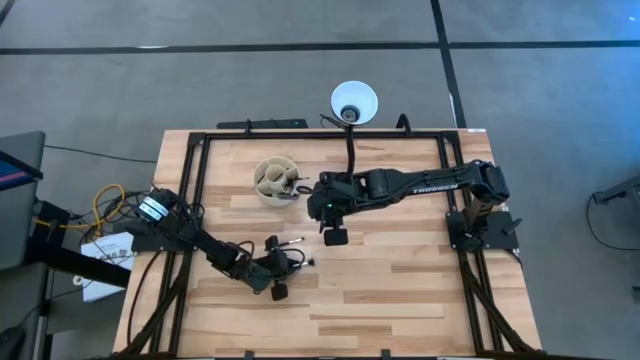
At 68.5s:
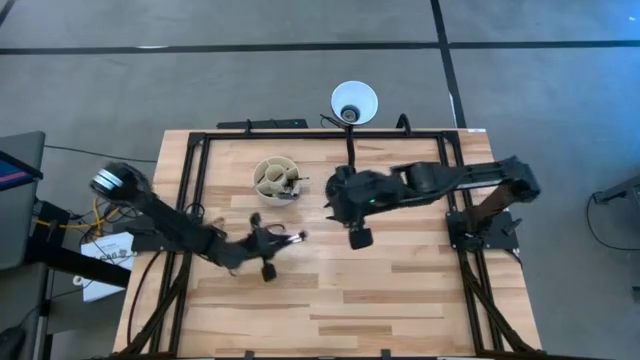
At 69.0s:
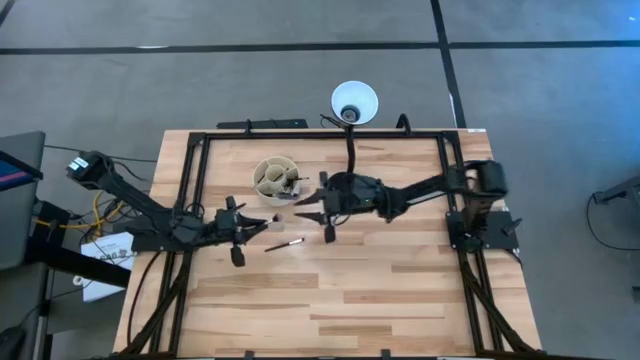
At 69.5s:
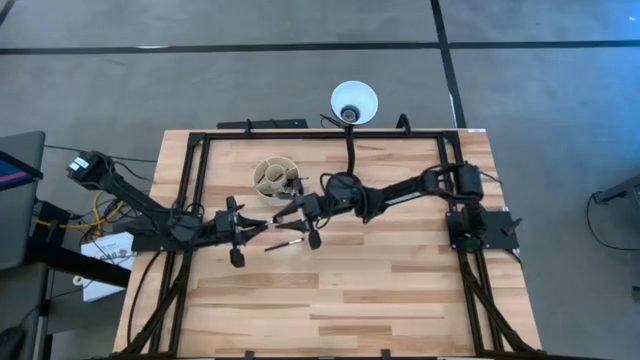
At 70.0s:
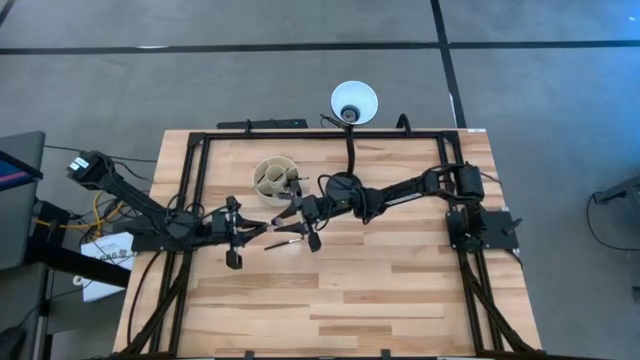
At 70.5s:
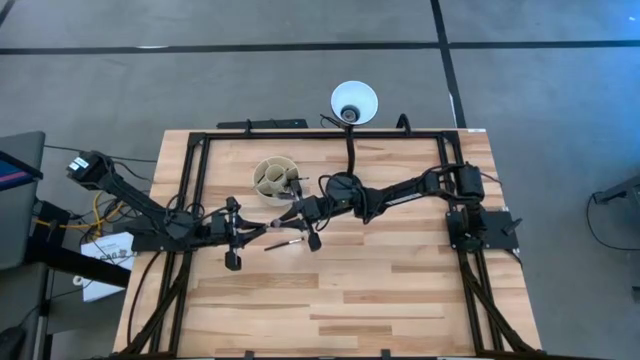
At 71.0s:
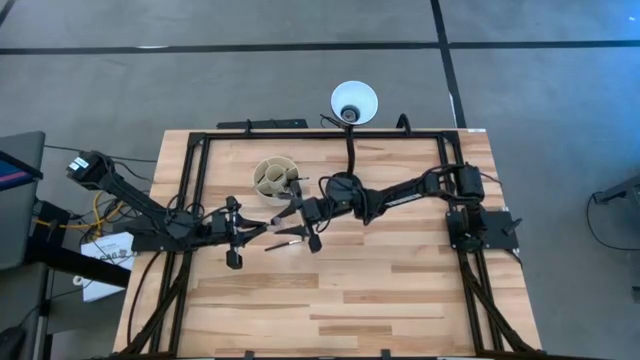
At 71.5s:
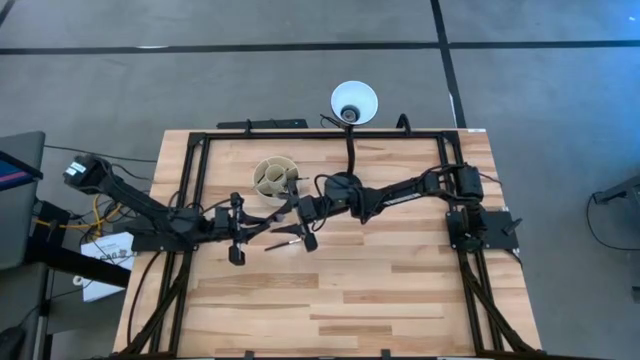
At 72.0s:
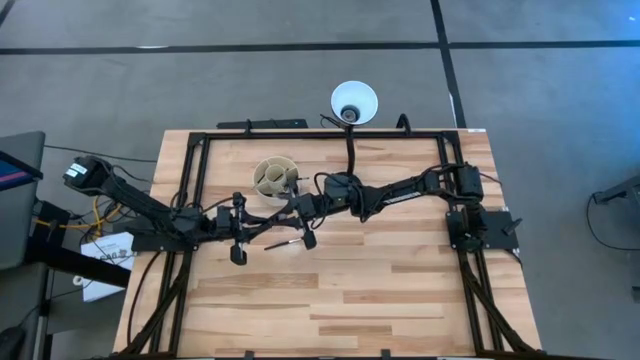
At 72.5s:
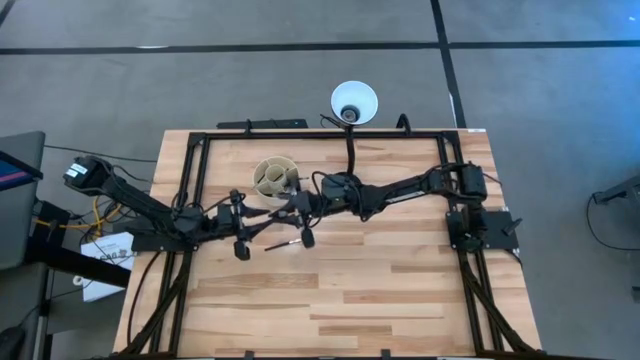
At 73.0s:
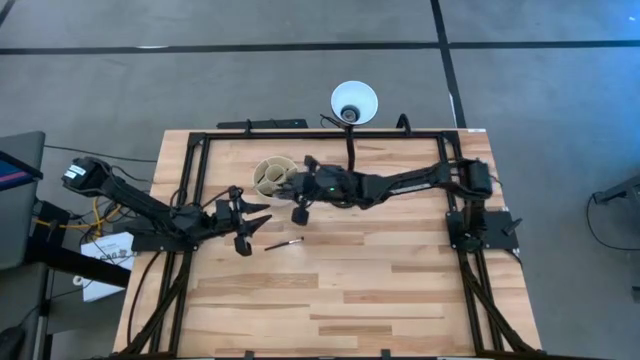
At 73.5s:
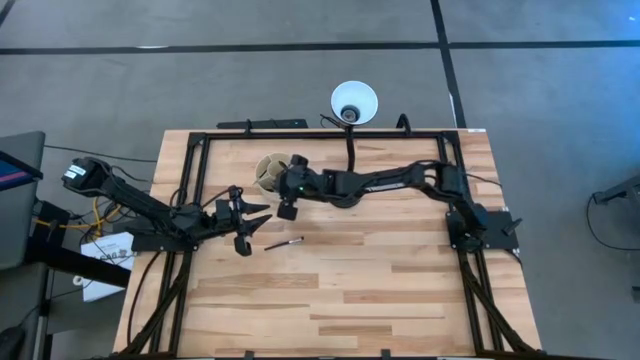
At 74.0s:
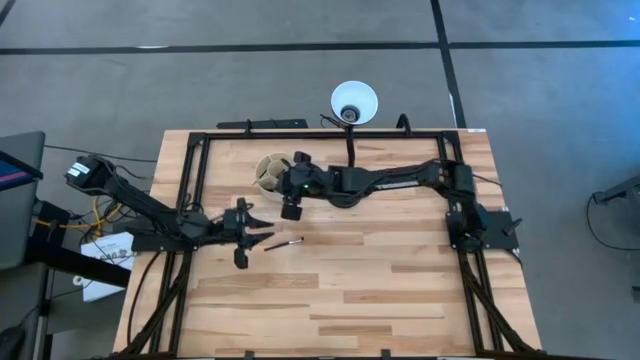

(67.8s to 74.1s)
Task: Put items in baskets/containers
Put the blush brush into the organizer

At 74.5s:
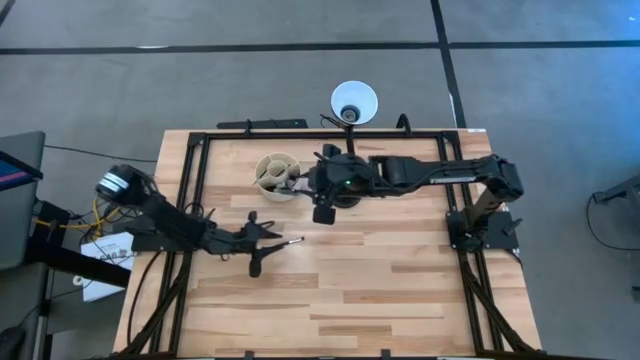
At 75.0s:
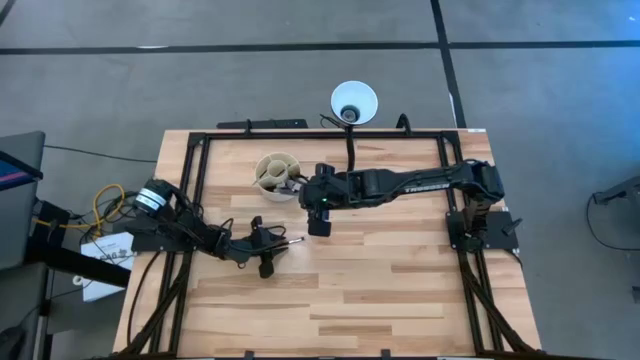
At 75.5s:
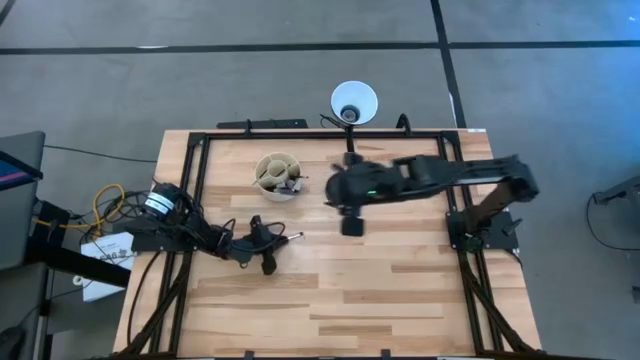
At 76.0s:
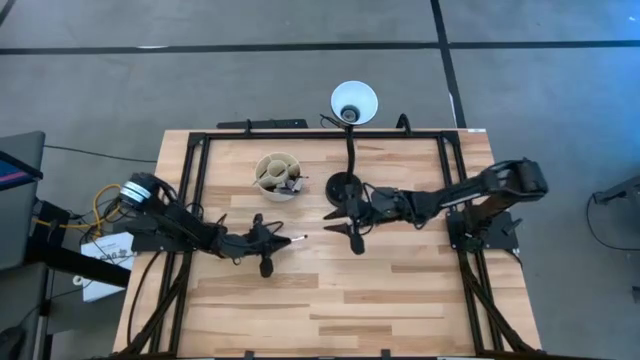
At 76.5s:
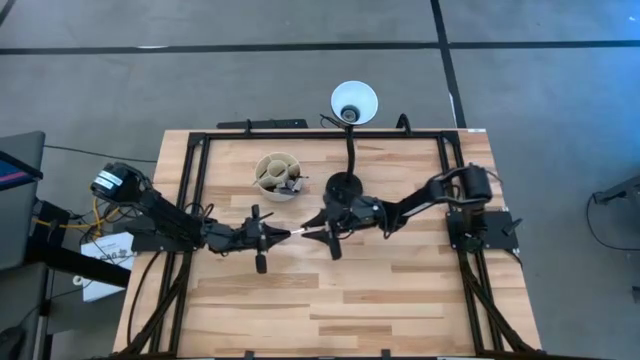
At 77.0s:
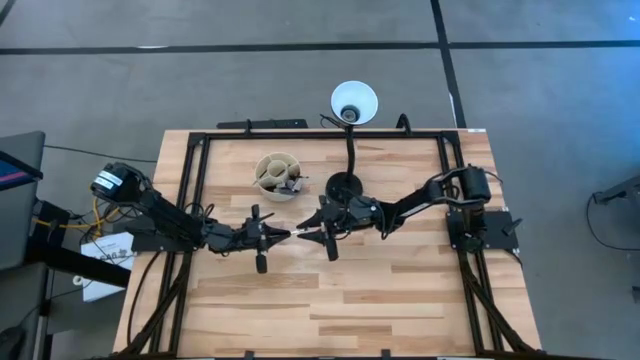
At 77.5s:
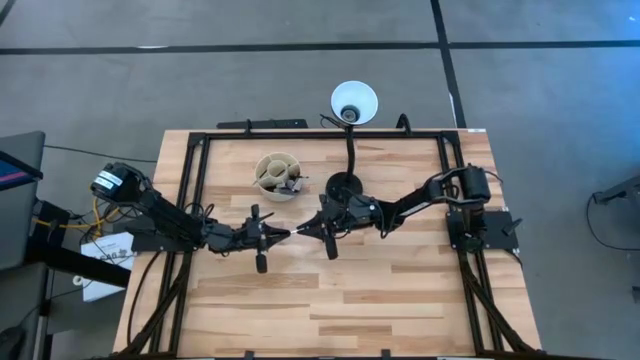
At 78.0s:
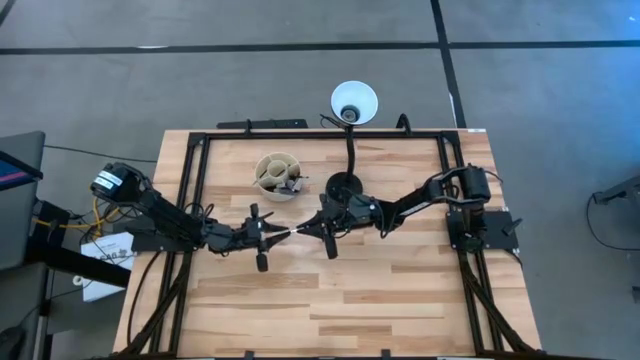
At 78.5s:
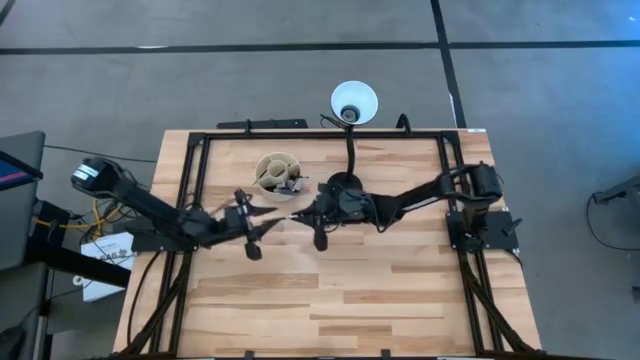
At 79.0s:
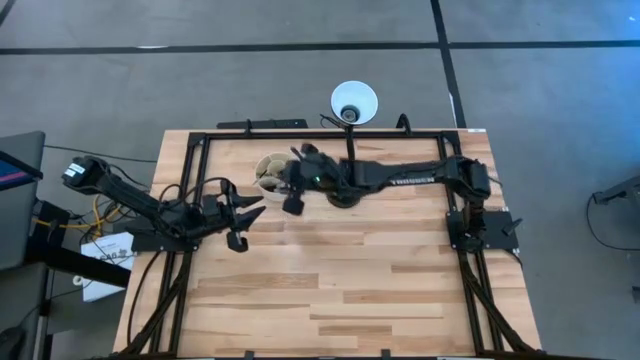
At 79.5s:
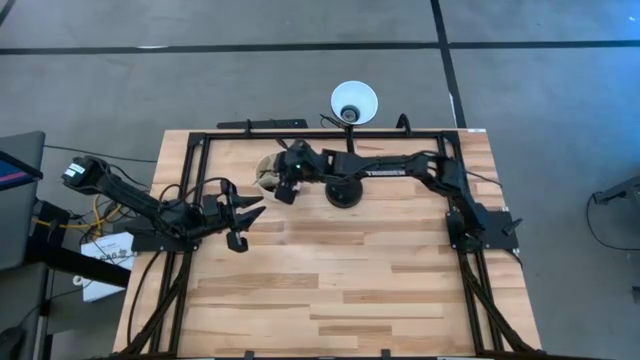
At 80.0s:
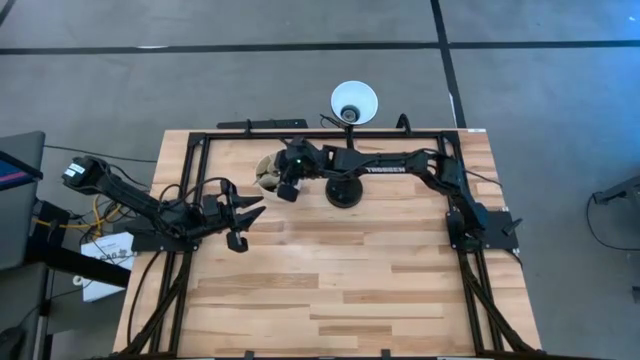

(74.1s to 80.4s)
Put the foundation brush into the organizer

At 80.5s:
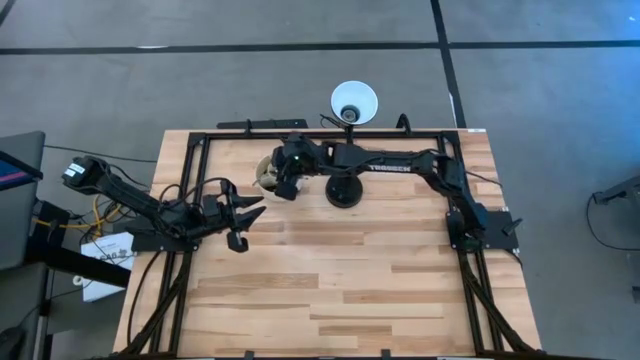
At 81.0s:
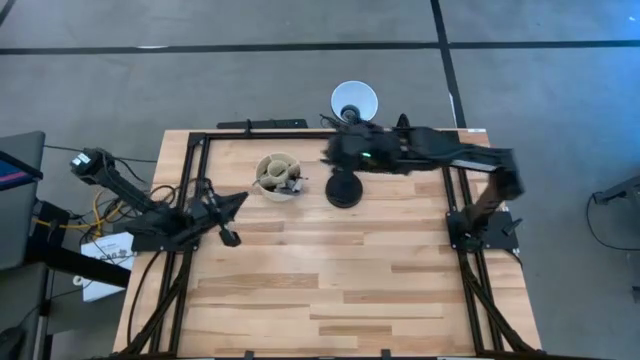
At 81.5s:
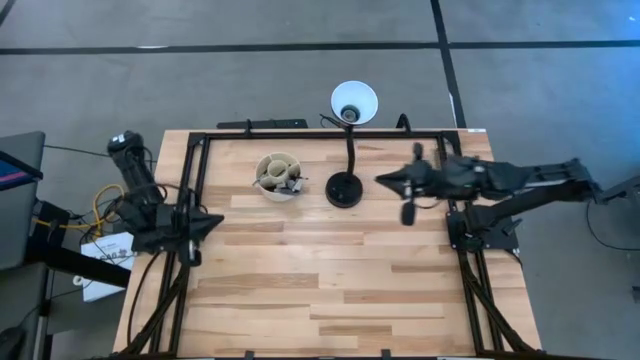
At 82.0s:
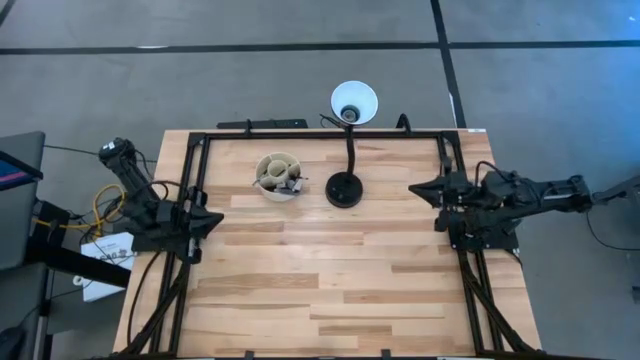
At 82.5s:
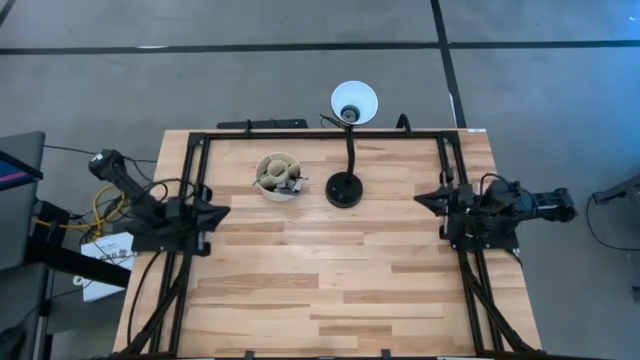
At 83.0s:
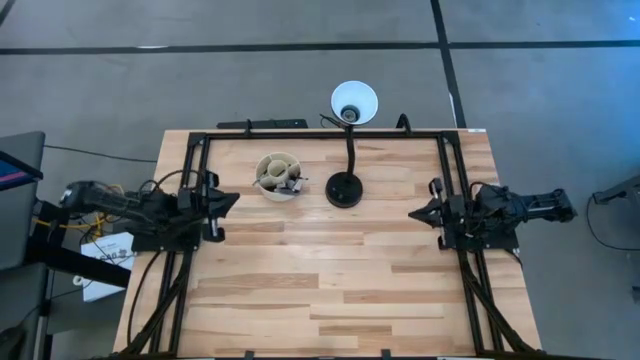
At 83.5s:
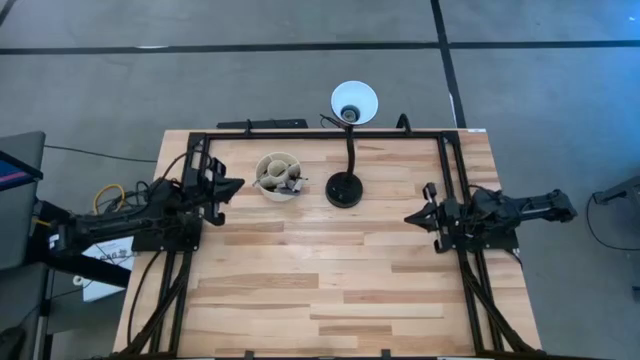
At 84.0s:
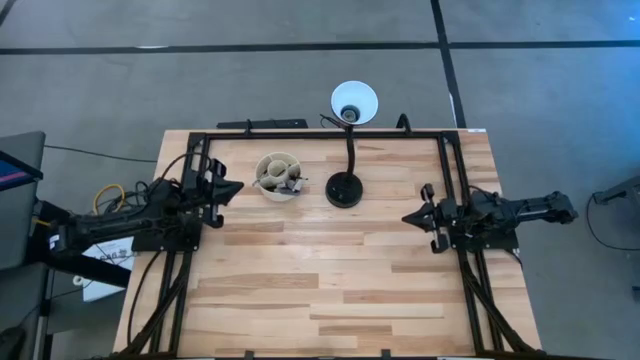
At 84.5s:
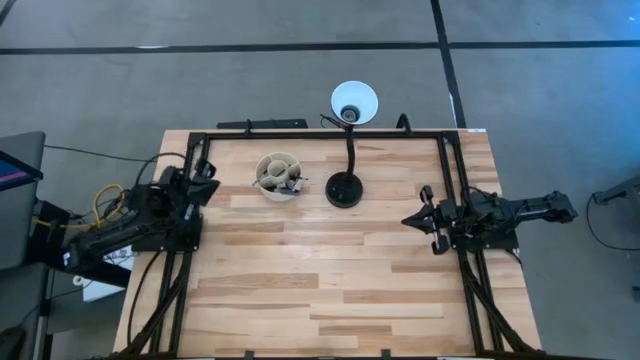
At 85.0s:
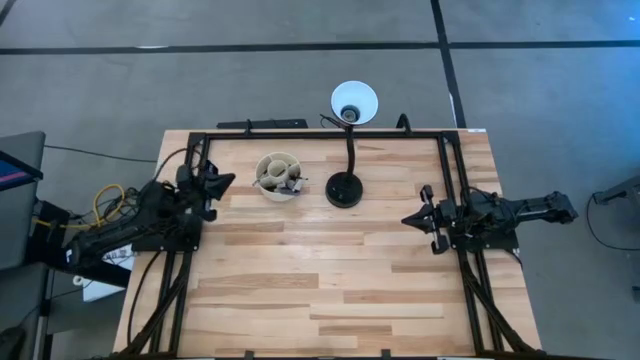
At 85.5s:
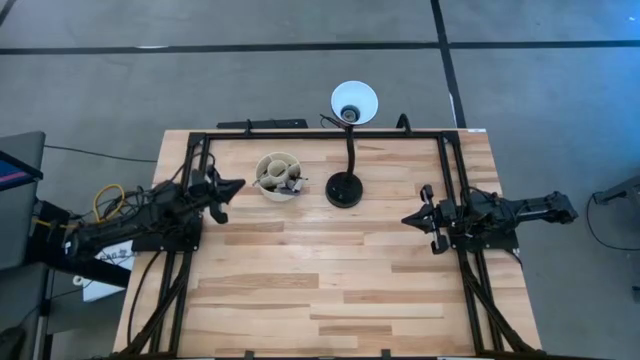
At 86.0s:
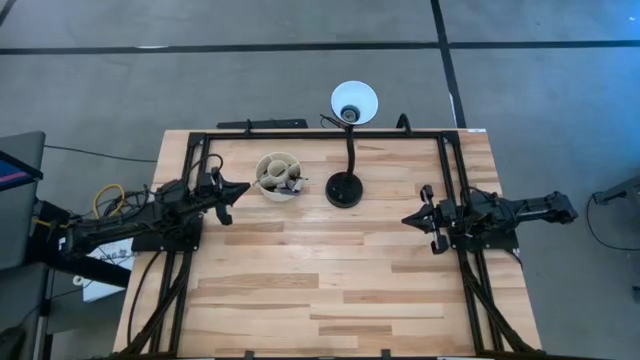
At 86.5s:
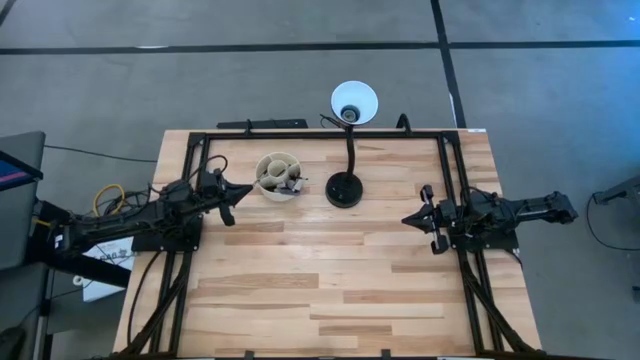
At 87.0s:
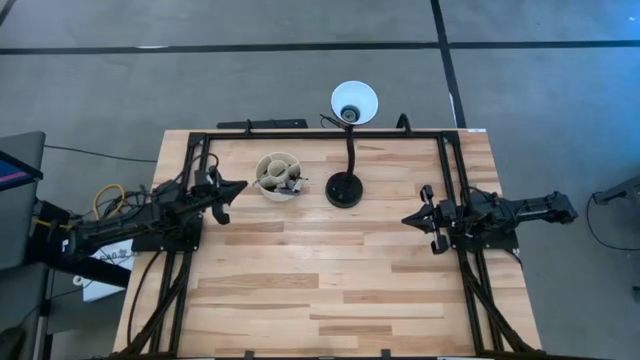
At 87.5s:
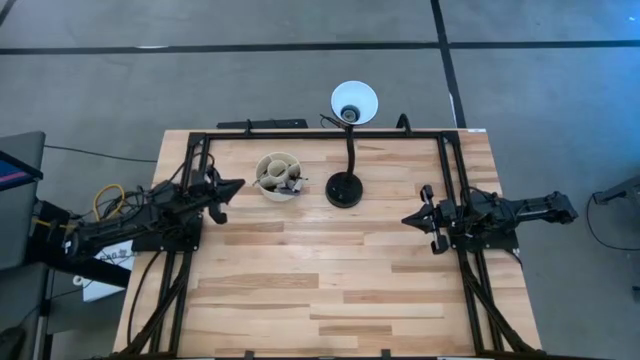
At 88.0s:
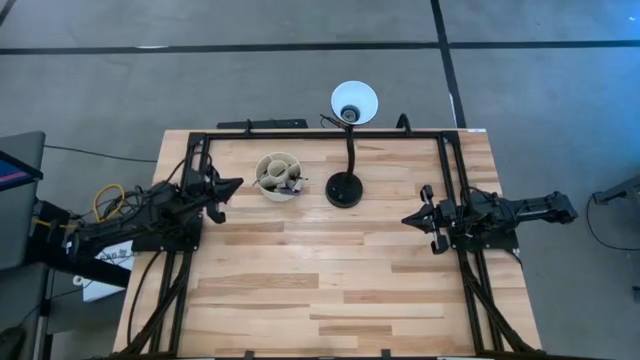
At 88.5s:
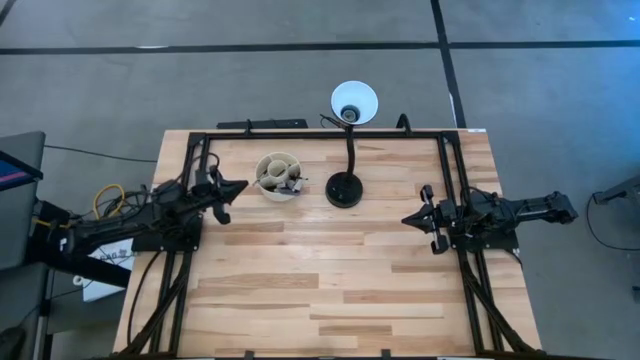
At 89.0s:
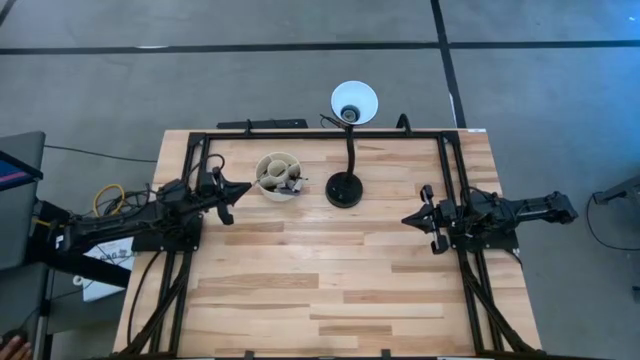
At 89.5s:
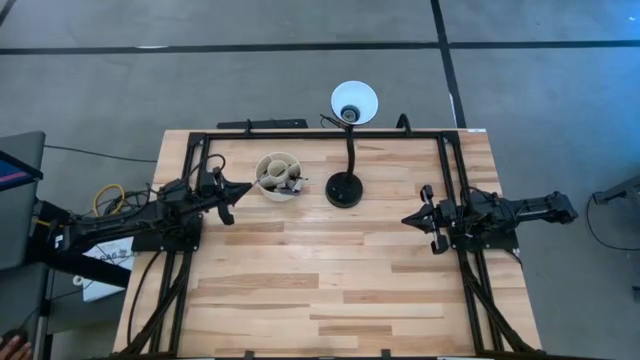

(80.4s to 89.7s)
Return to Home Position
